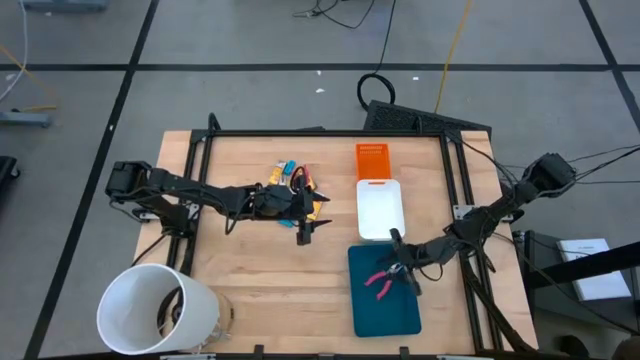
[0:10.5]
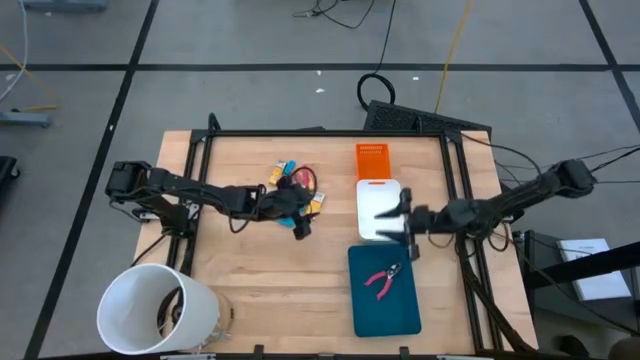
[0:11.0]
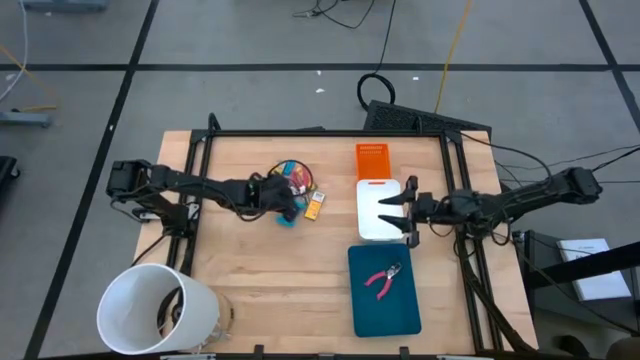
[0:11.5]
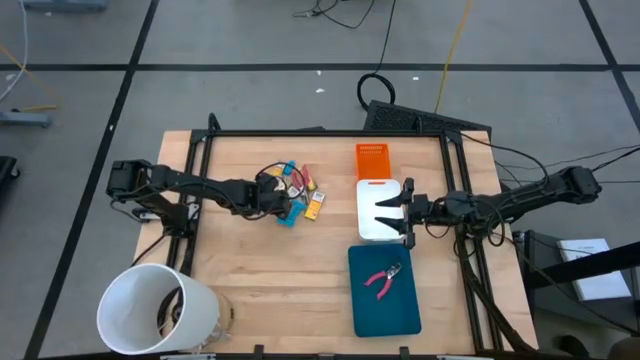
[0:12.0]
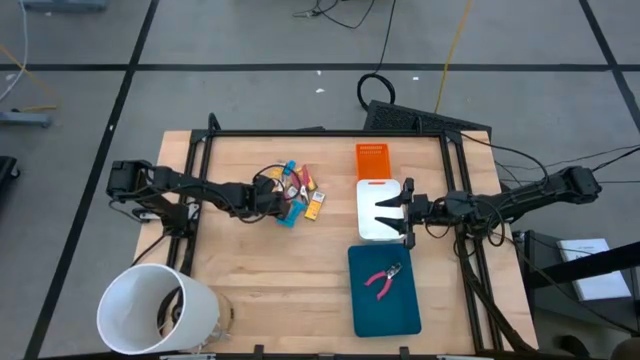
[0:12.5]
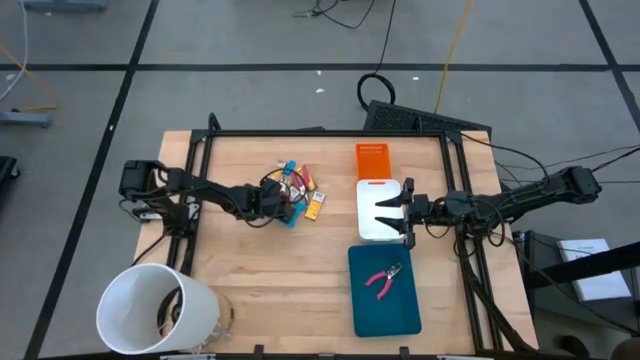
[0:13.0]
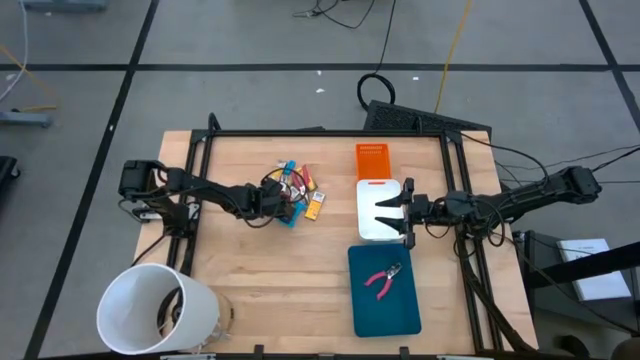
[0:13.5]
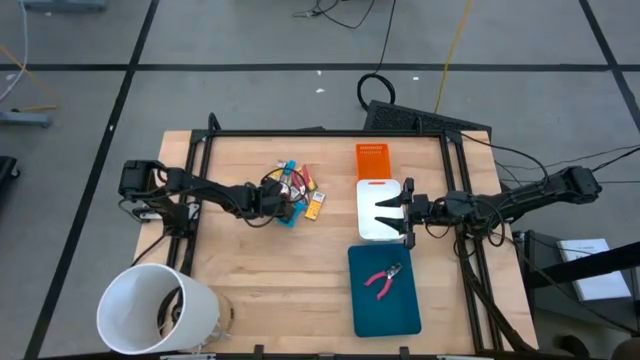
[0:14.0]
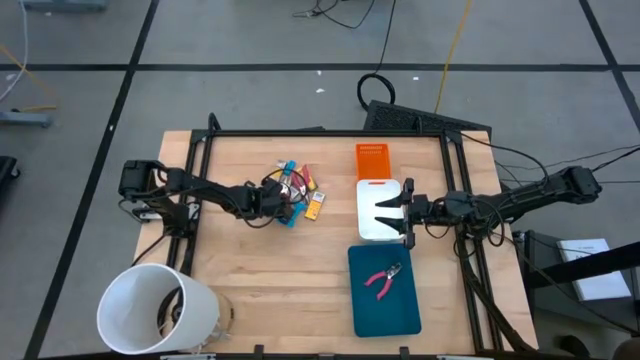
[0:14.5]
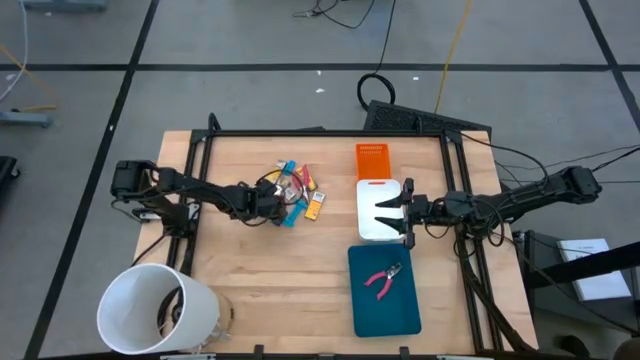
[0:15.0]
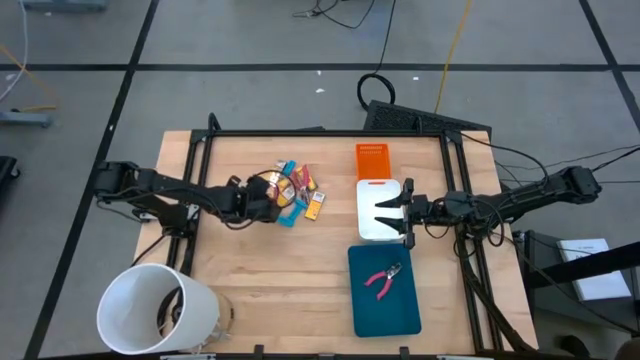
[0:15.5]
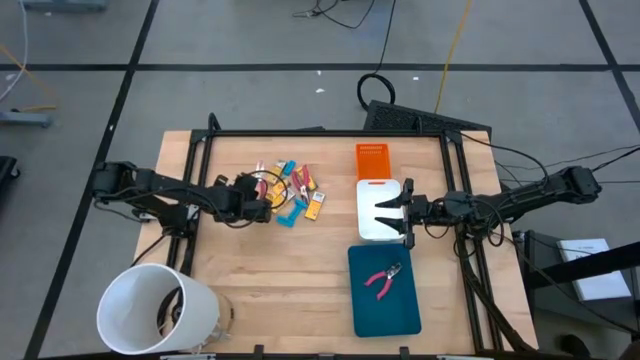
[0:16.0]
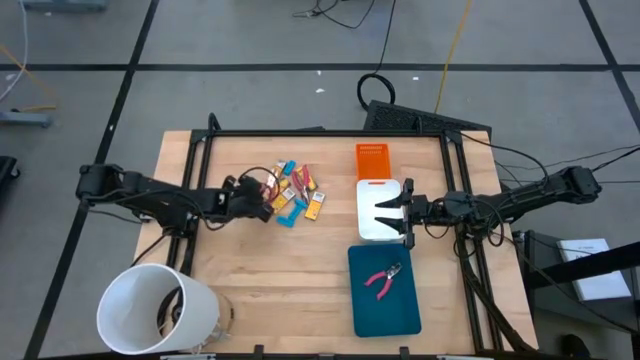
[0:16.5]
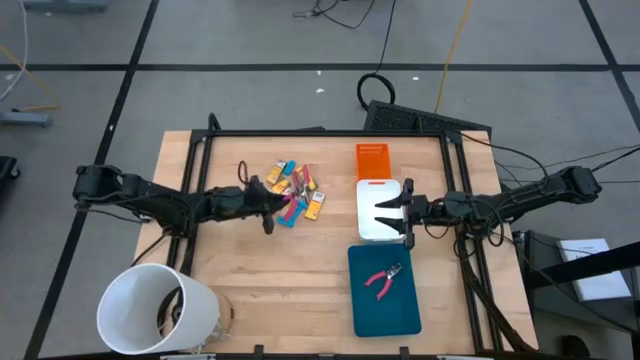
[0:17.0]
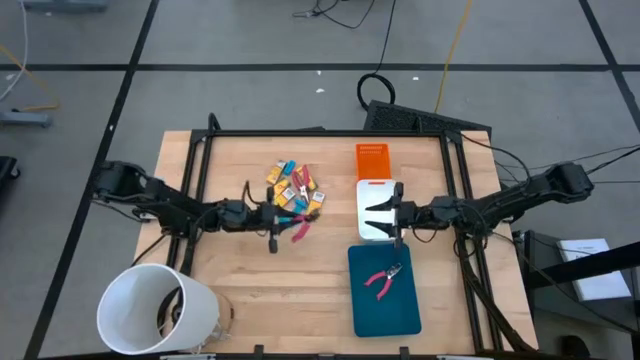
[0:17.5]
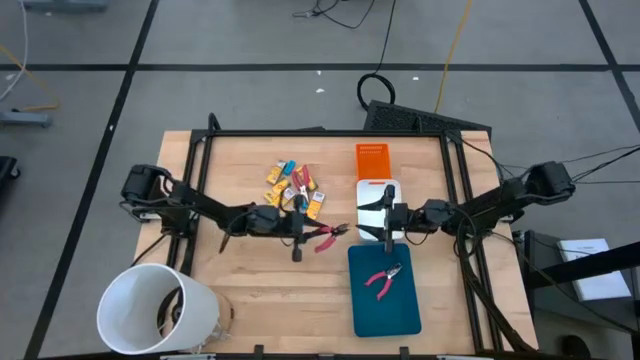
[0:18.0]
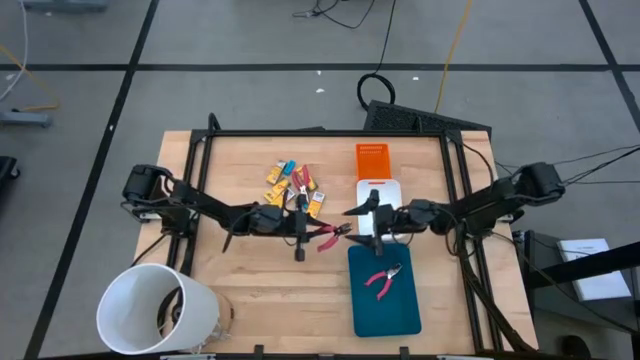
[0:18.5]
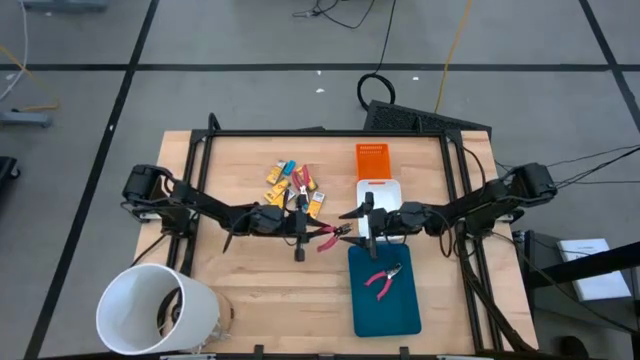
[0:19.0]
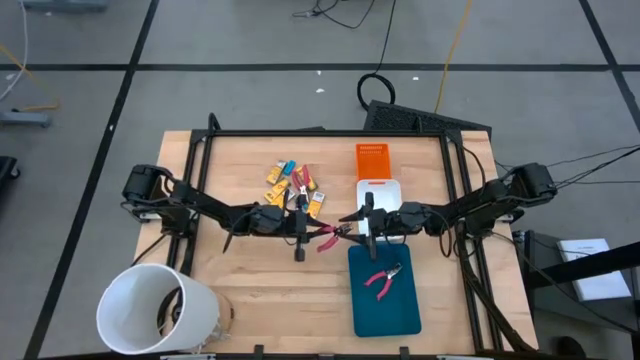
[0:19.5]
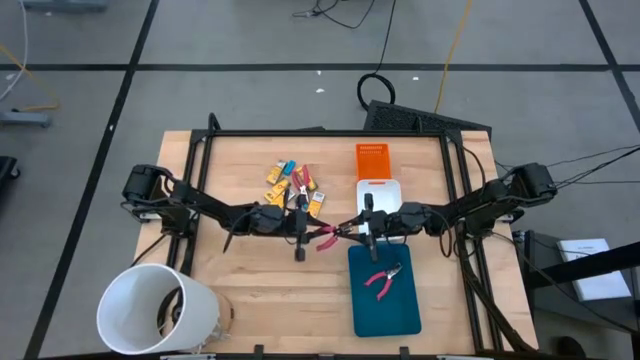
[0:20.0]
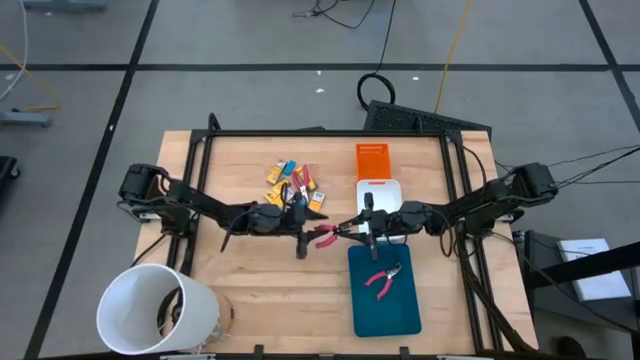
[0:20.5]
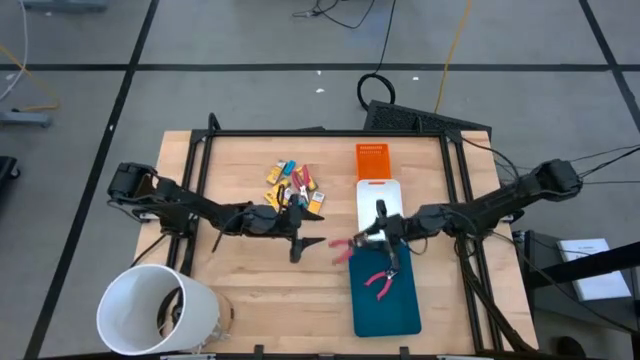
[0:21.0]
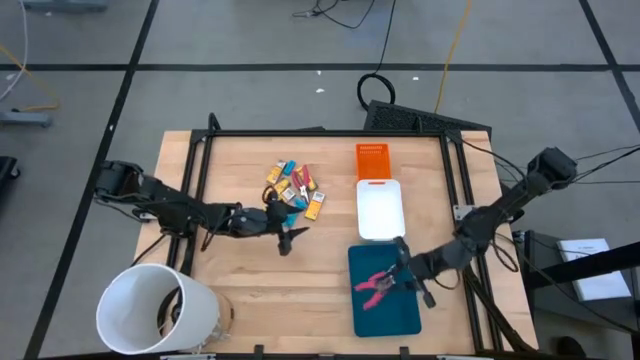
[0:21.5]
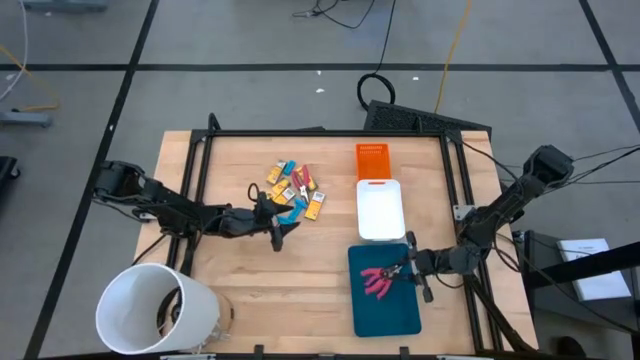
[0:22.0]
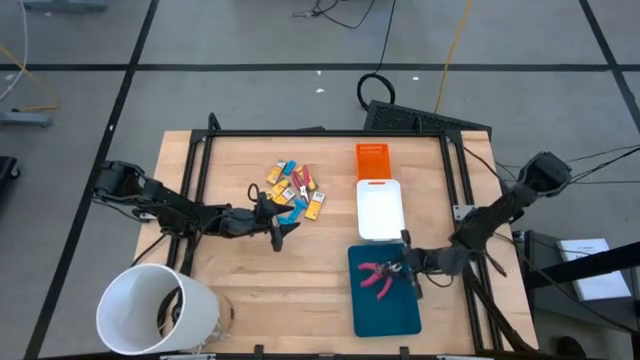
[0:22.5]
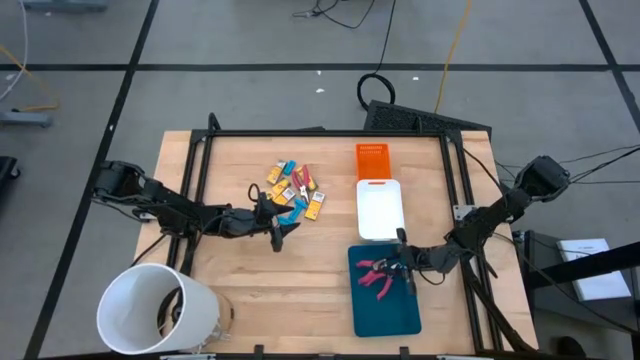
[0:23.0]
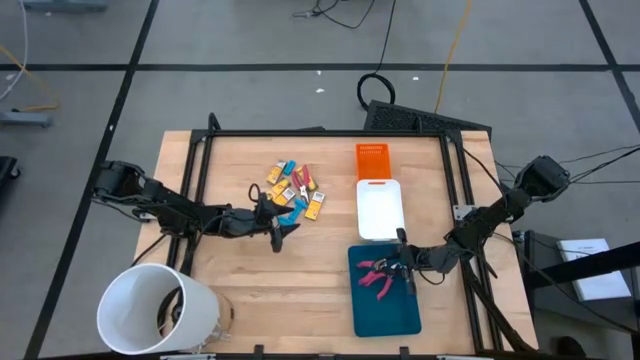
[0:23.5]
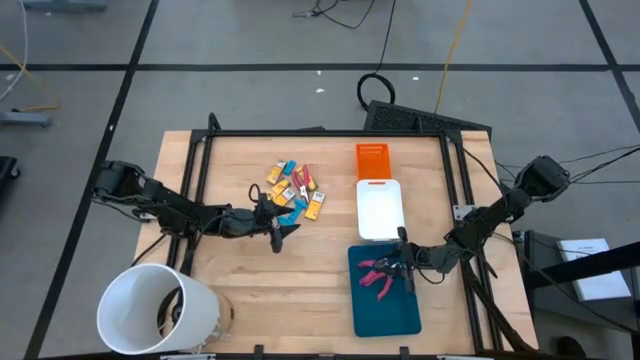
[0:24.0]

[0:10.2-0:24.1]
Task: Pick & Place School Supplies
Put the pink puncher into the blue bin

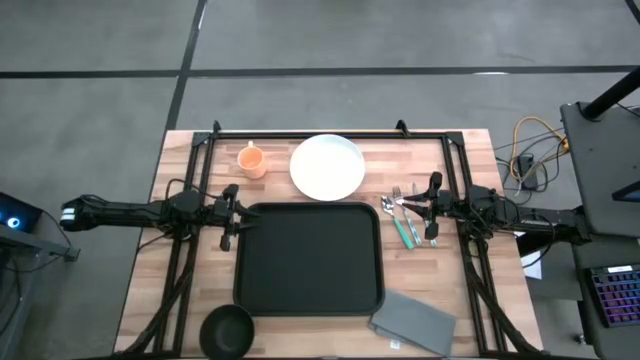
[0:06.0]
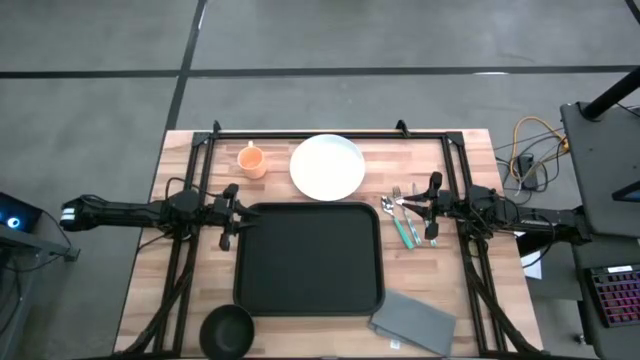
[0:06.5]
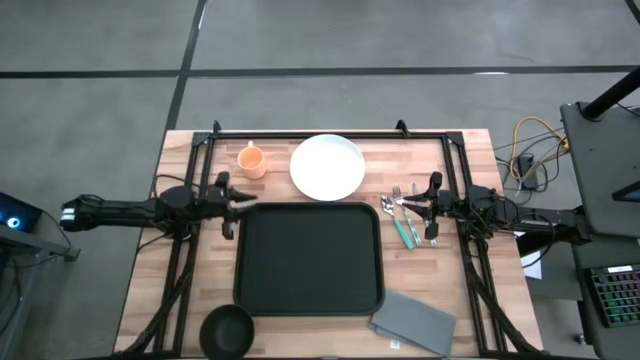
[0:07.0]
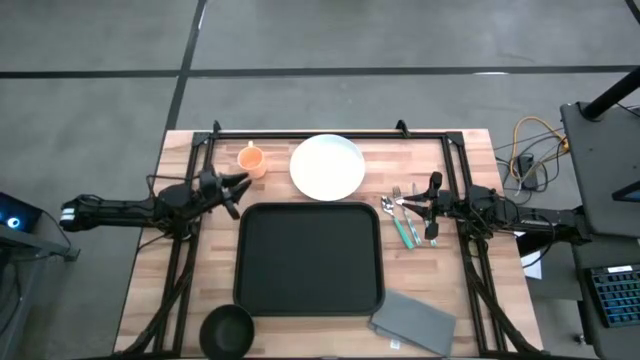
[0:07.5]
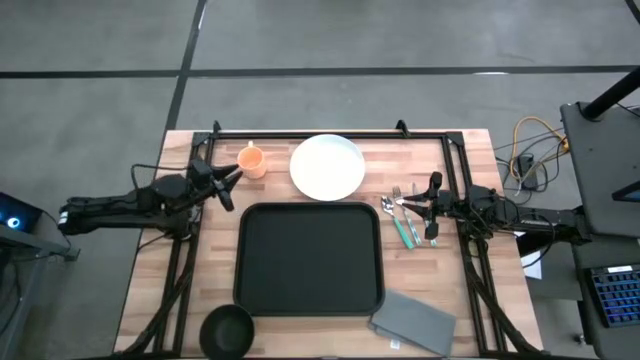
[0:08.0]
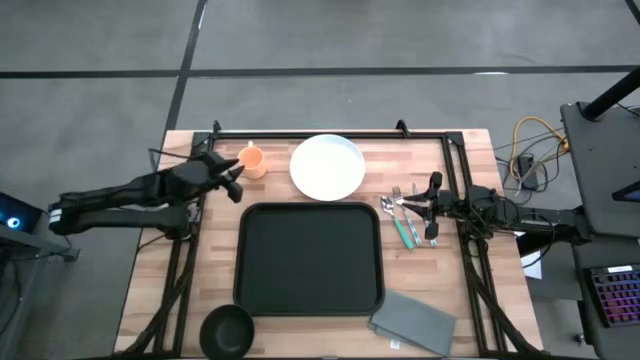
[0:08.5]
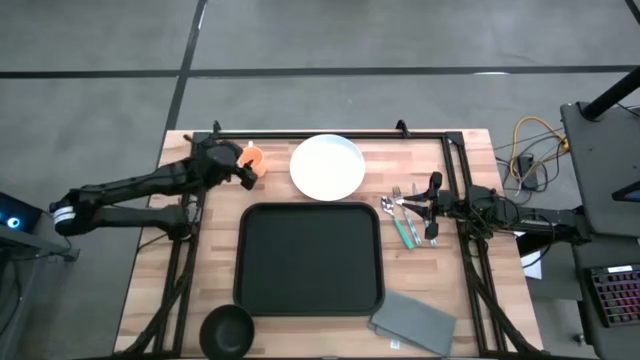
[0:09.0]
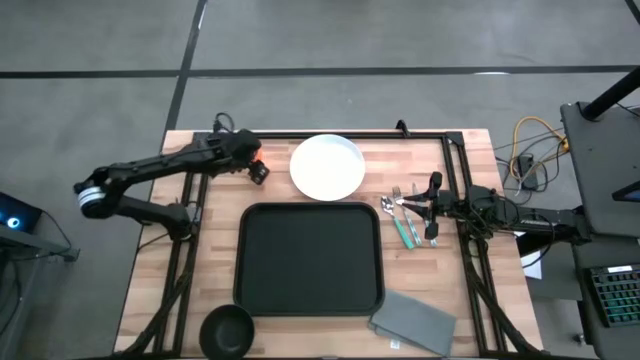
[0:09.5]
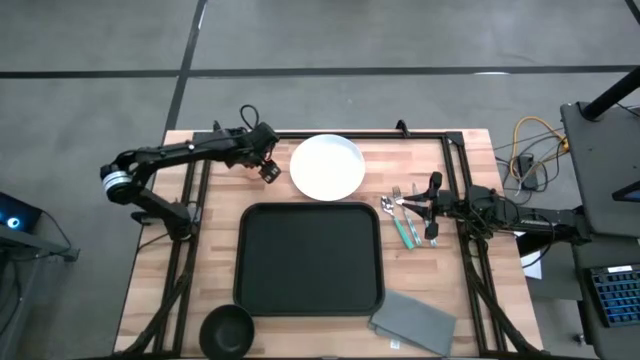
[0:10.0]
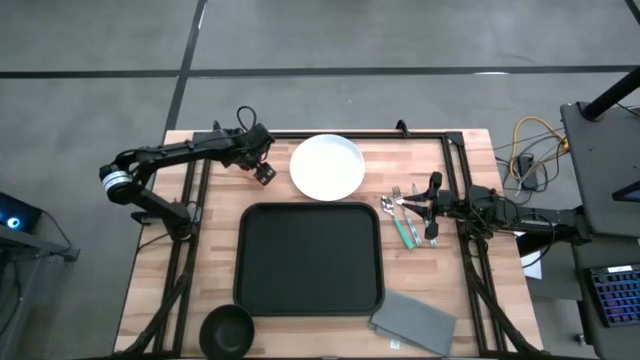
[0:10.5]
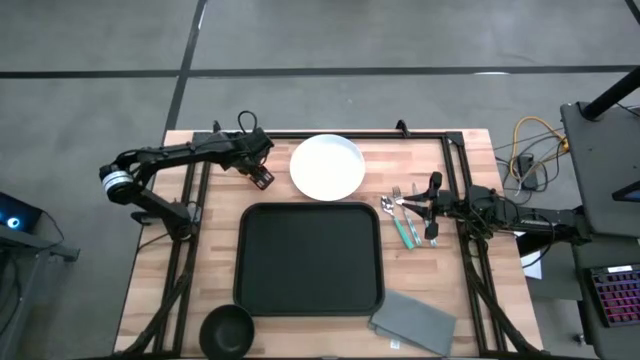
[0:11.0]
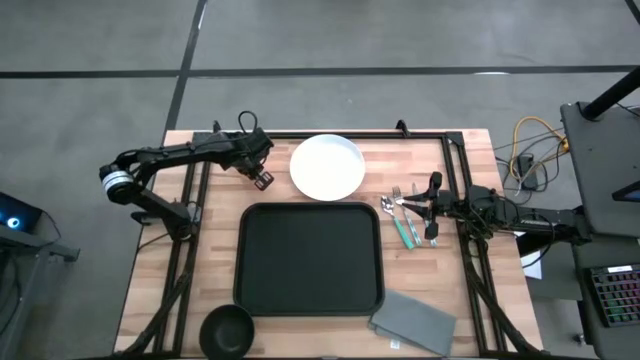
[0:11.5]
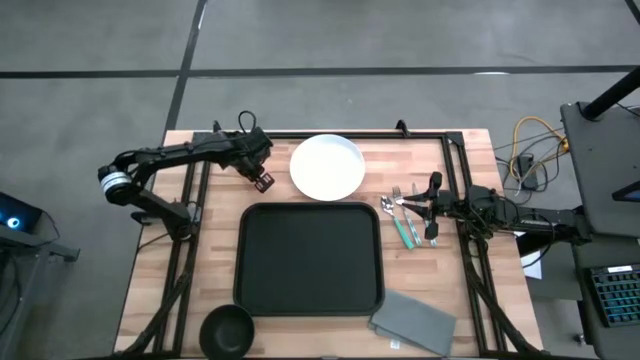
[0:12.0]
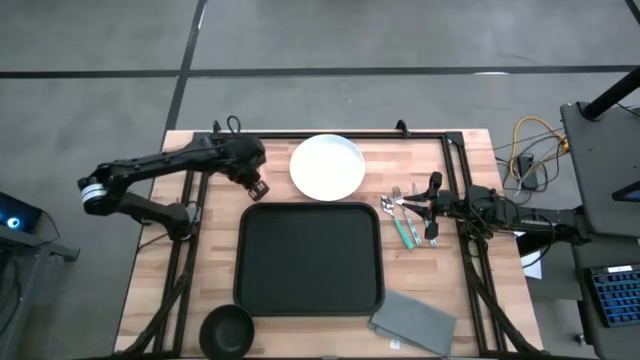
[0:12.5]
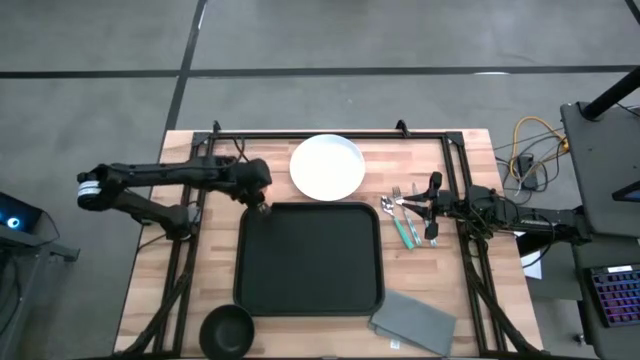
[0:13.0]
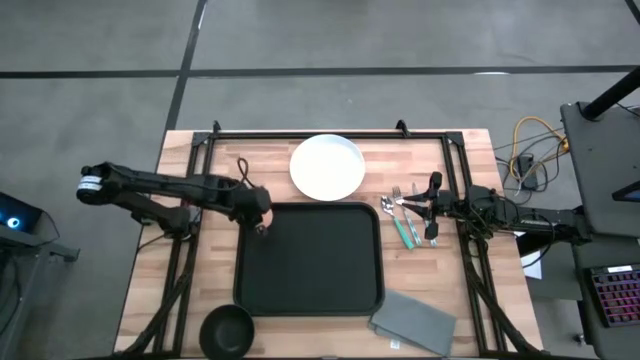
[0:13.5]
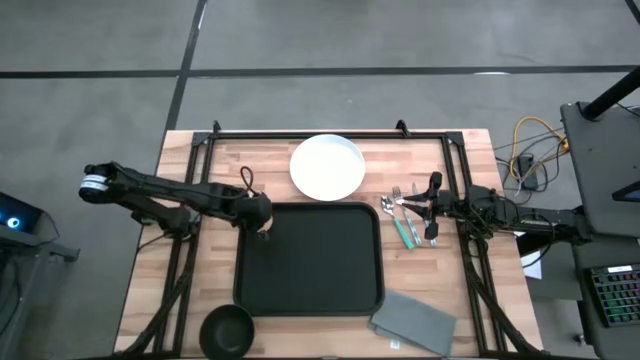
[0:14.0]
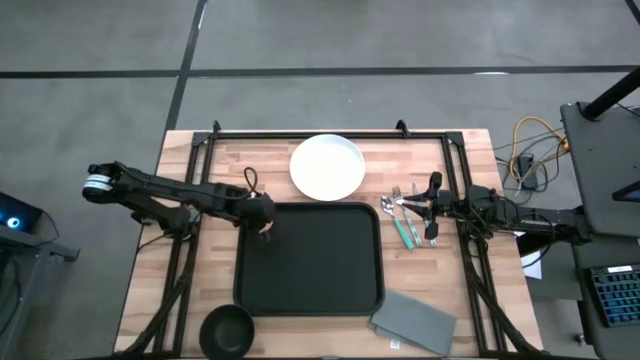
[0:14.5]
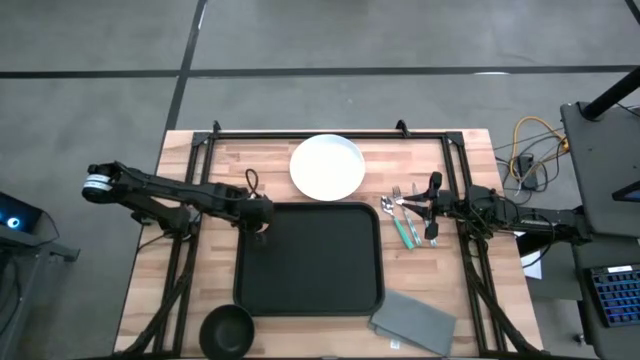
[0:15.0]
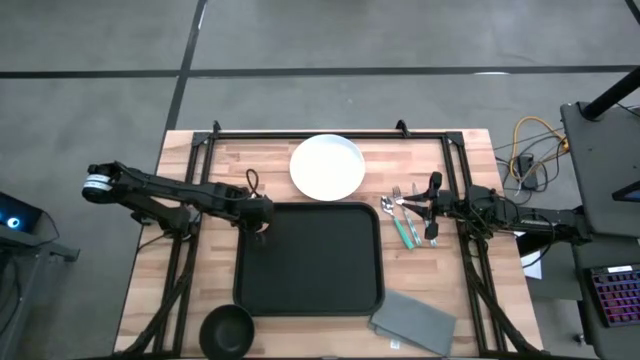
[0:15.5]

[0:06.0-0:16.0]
Task: Set up tray
Put the orange mug on the black tray
